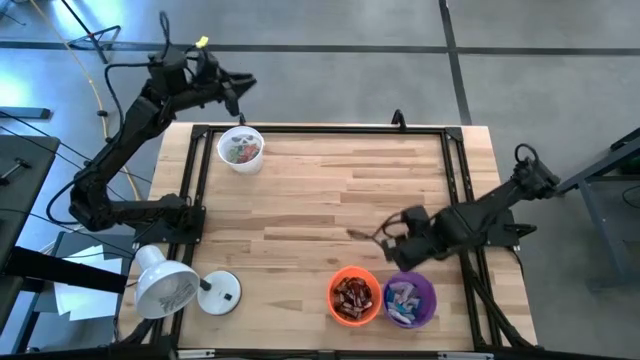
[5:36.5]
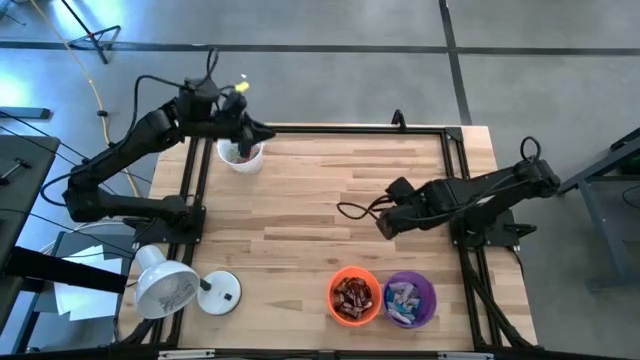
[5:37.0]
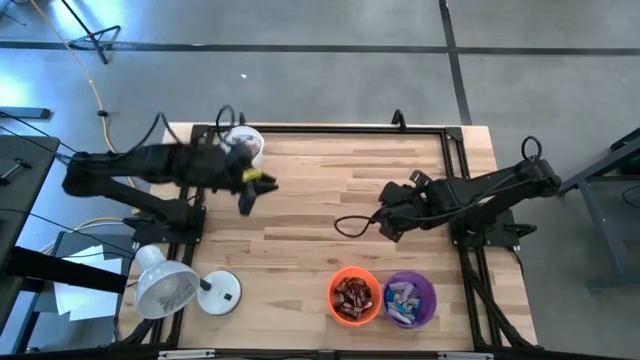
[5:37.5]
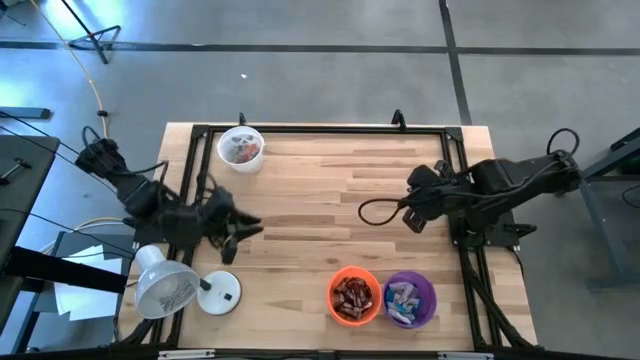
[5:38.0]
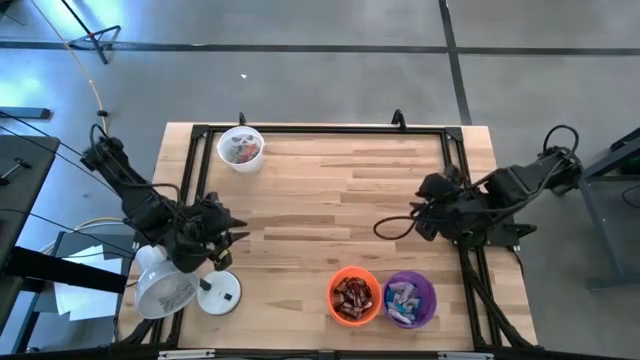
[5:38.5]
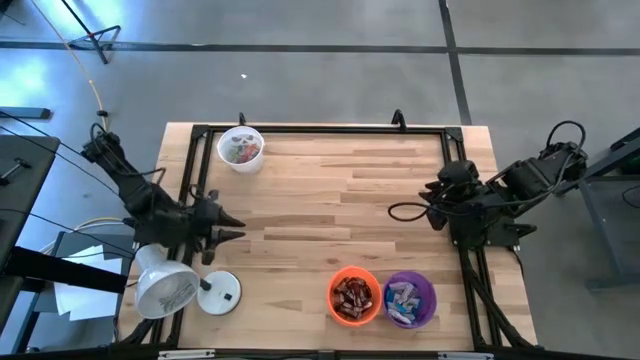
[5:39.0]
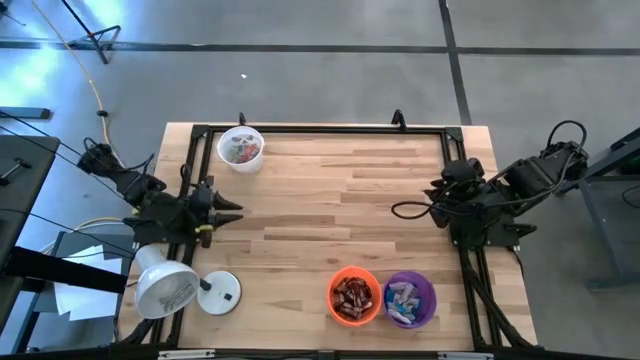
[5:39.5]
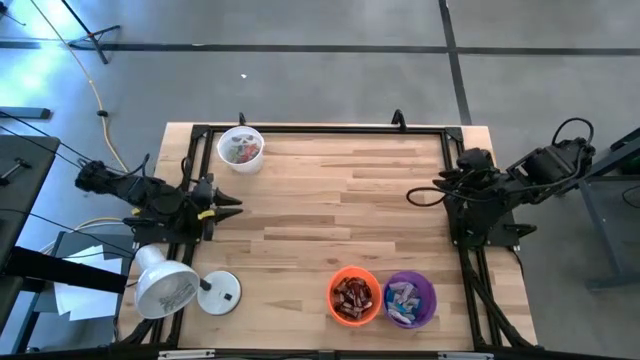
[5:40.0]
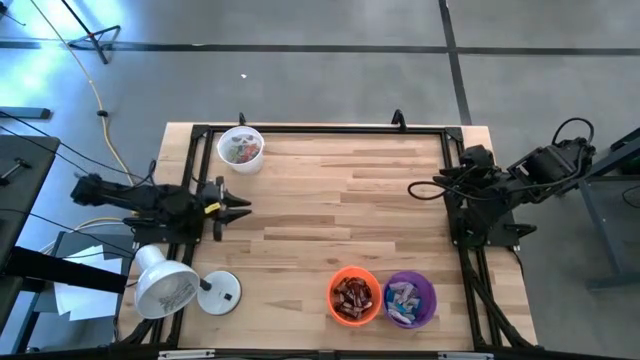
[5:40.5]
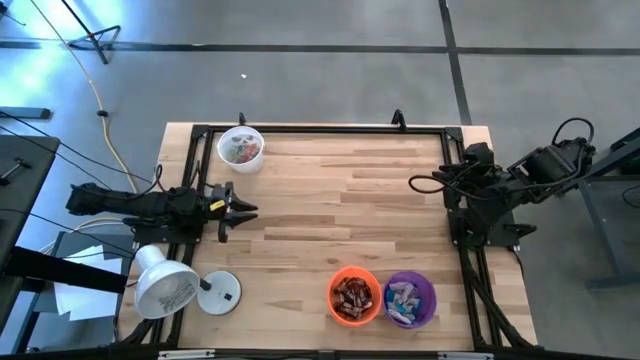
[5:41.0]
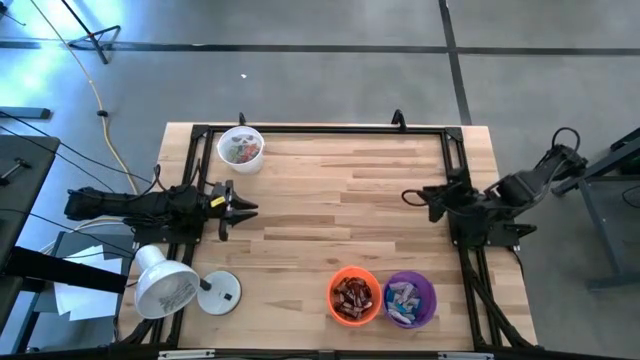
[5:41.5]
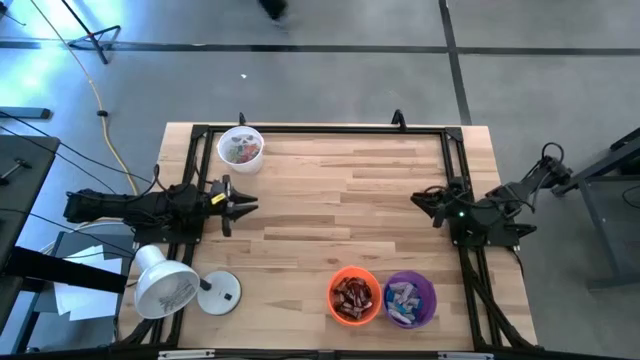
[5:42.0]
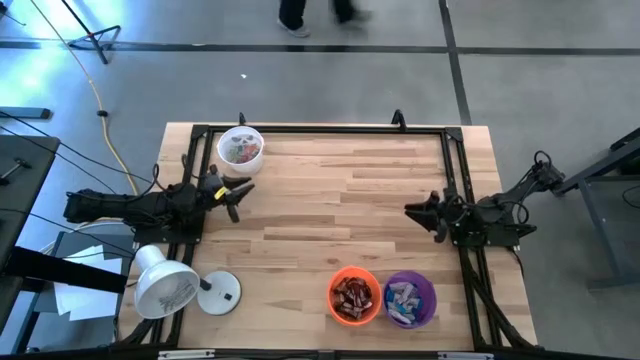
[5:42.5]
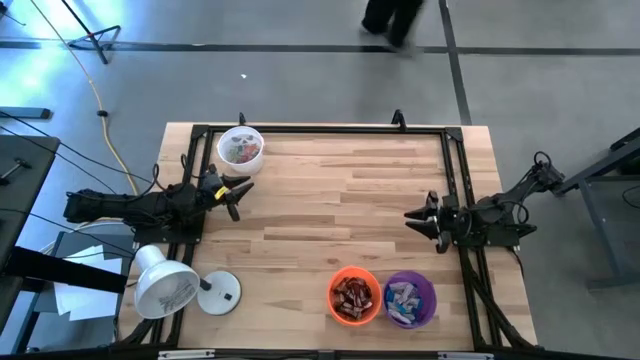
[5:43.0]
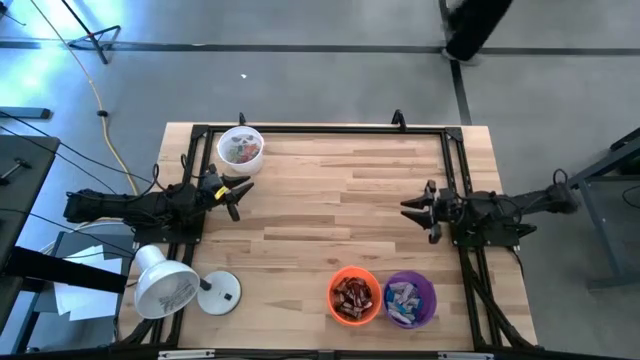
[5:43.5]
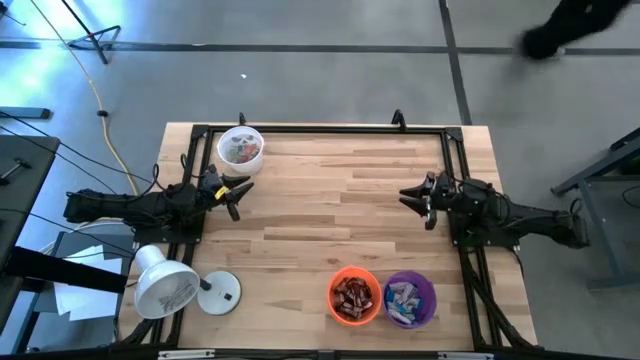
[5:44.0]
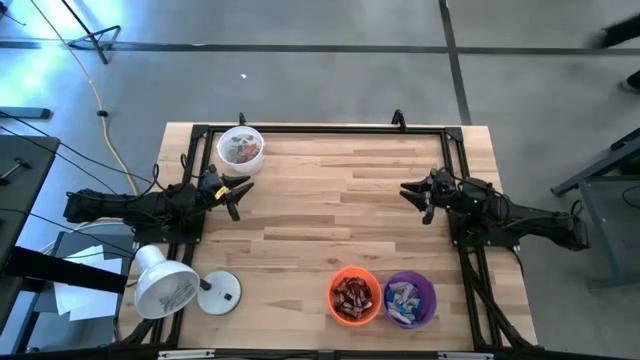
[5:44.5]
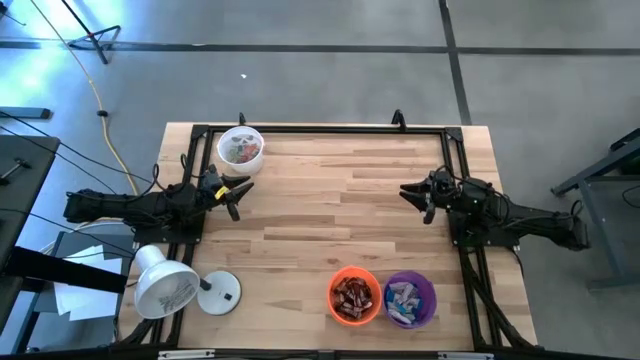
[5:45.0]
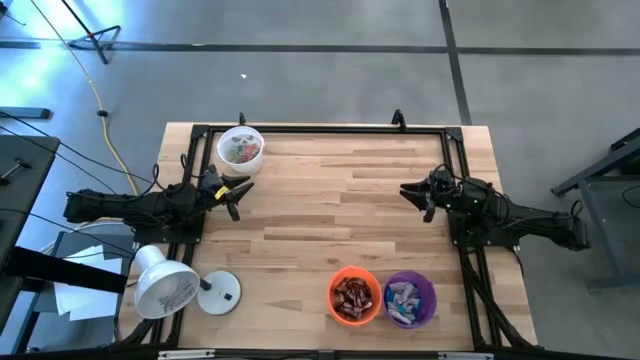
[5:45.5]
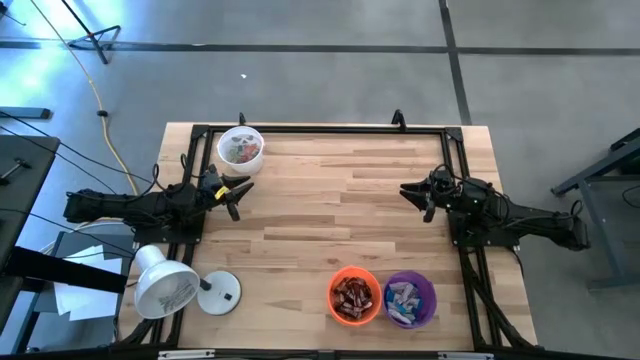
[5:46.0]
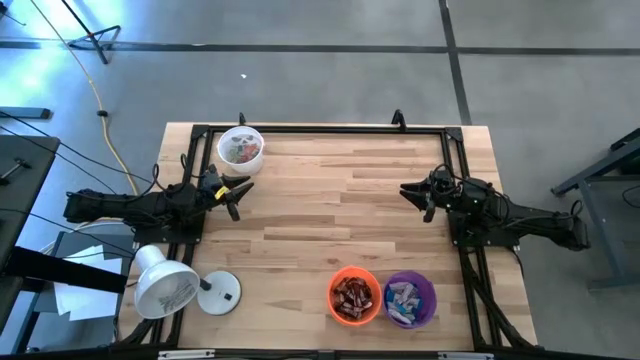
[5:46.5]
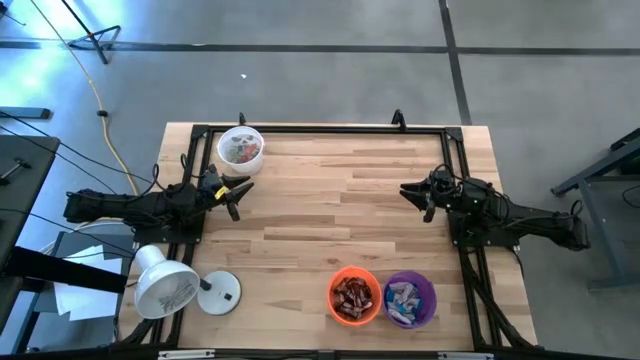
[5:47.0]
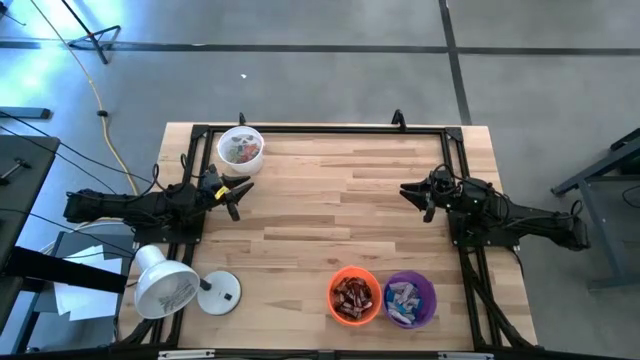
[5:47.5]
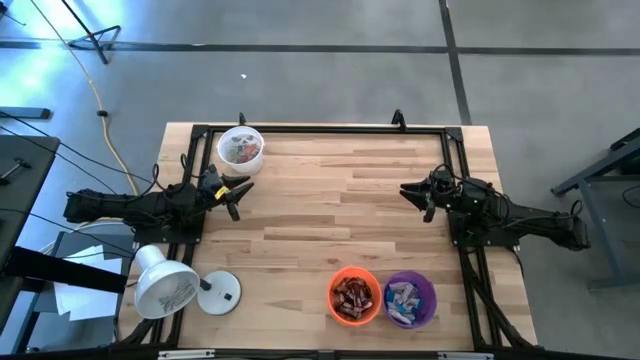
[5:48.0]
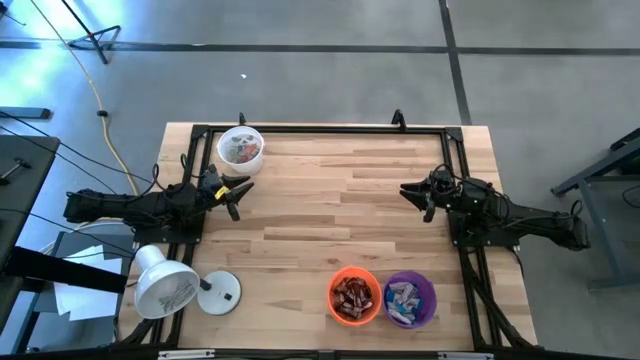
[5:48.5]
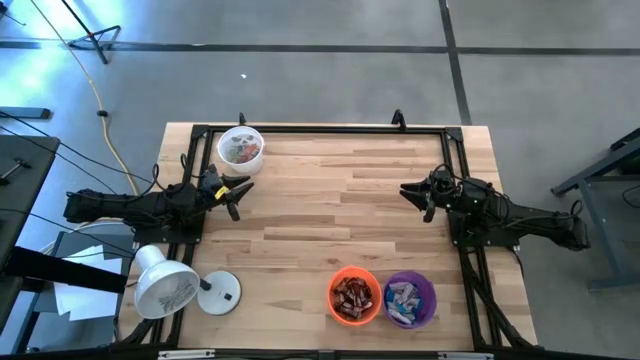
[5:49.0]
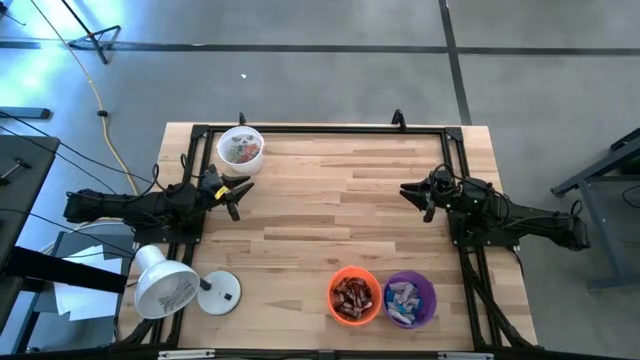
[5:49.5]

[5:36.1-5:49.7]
Task: Organize candy in baskets
Return to Home Position

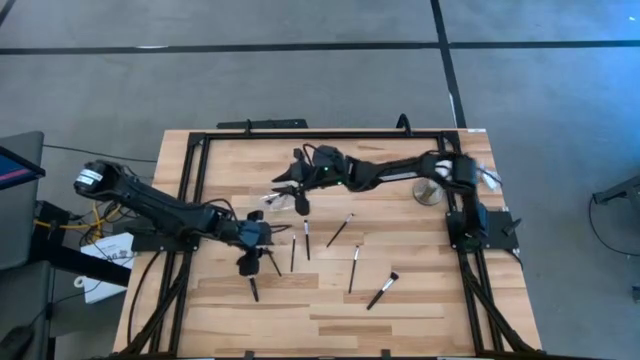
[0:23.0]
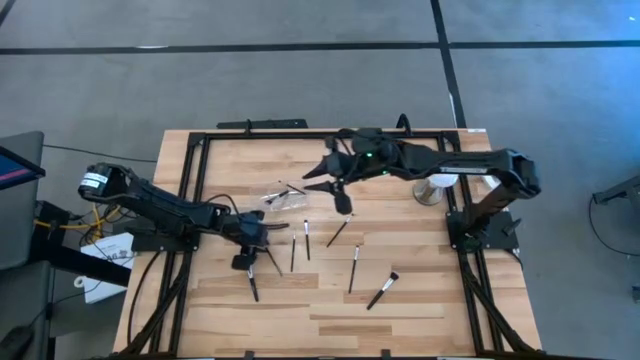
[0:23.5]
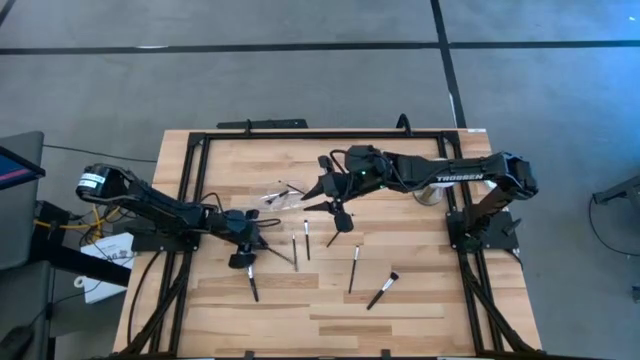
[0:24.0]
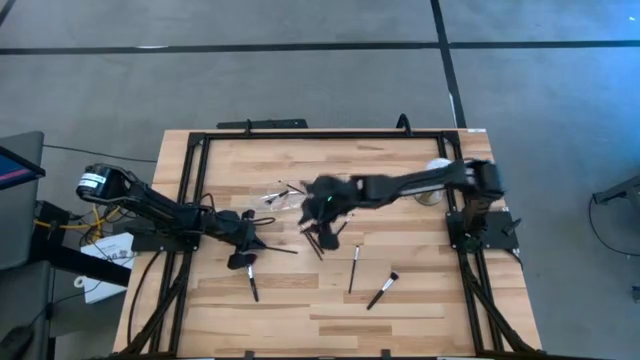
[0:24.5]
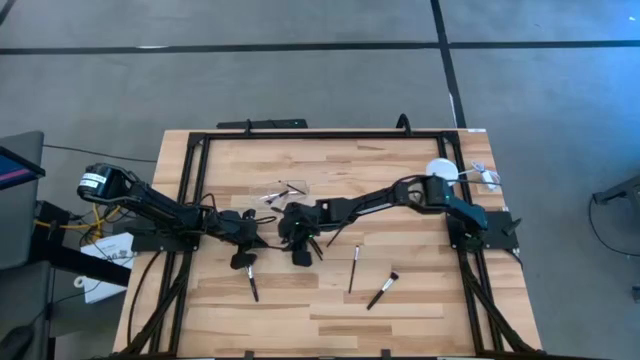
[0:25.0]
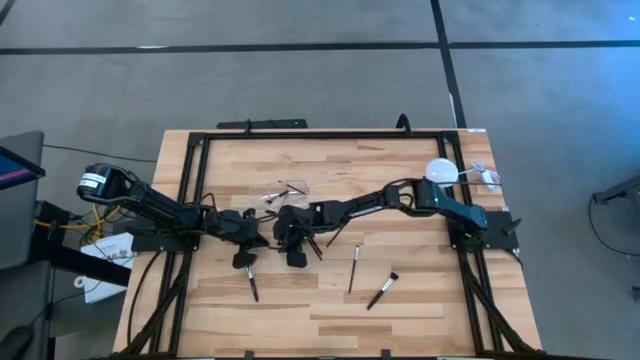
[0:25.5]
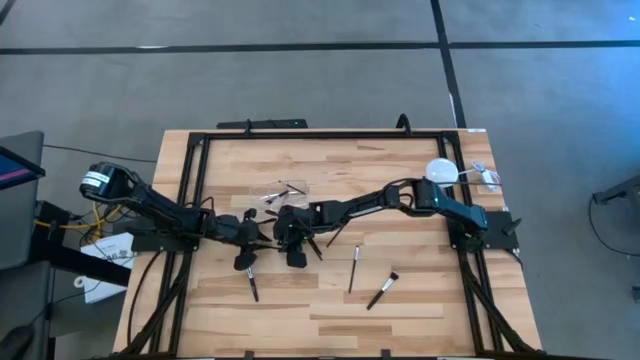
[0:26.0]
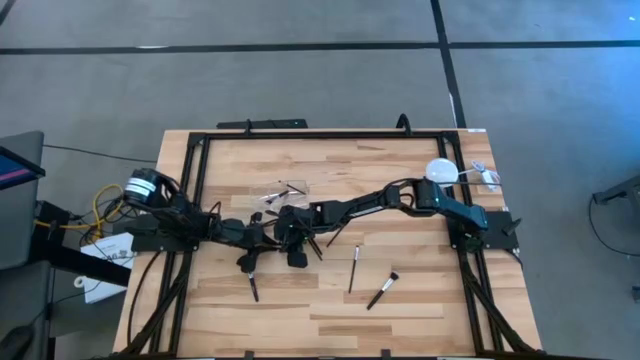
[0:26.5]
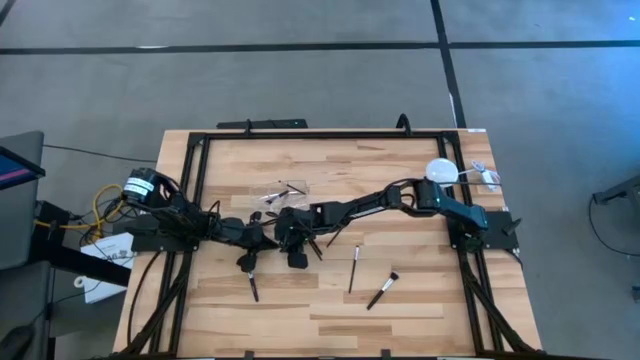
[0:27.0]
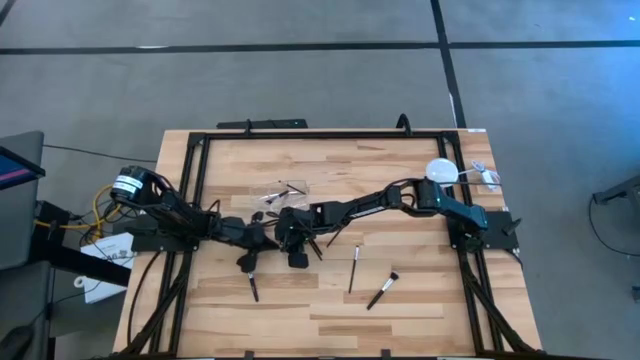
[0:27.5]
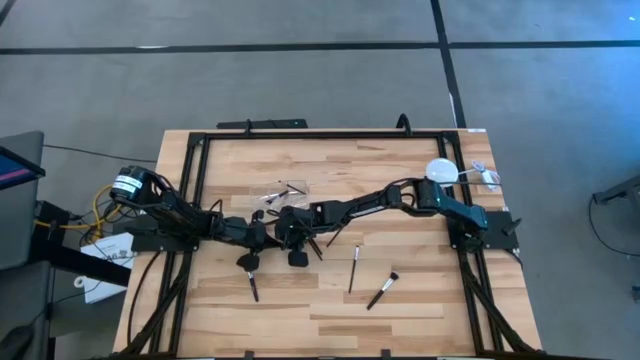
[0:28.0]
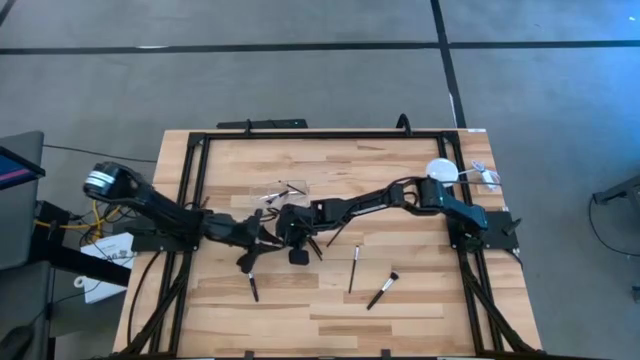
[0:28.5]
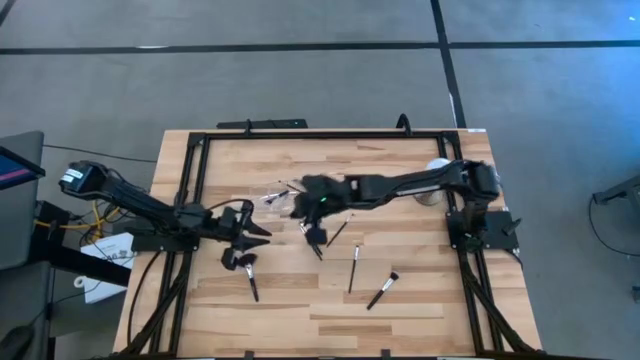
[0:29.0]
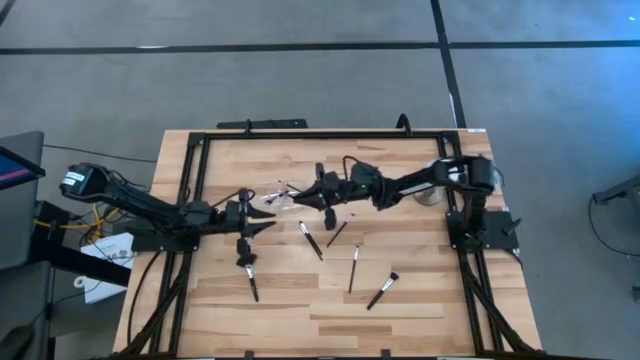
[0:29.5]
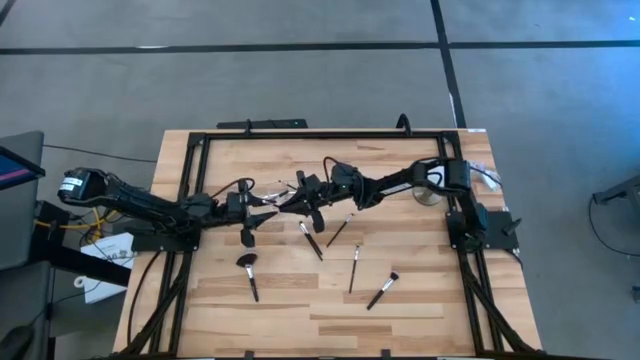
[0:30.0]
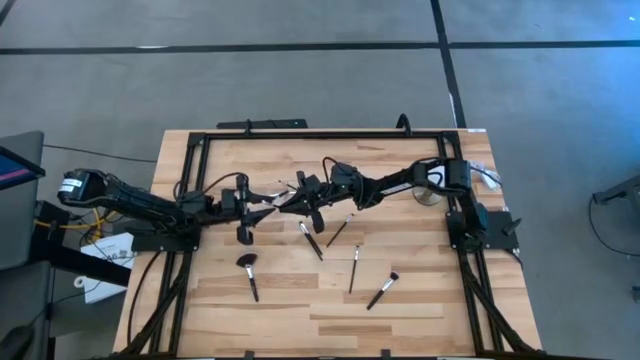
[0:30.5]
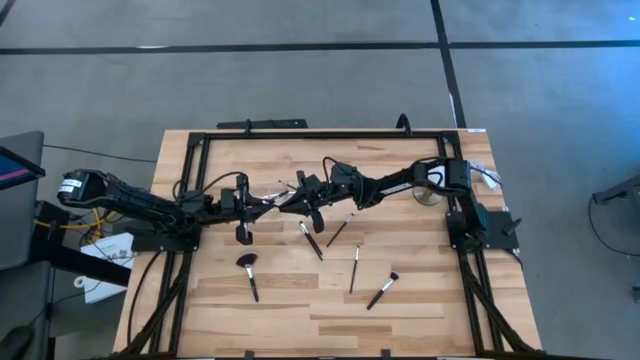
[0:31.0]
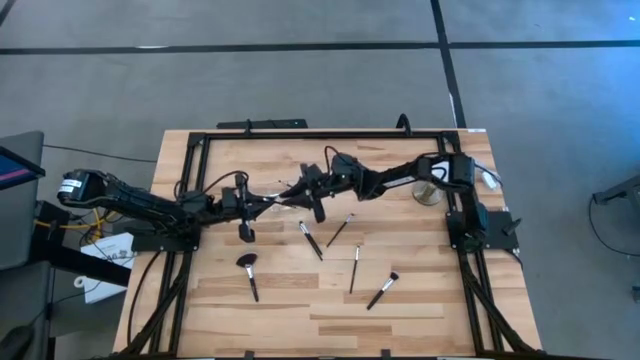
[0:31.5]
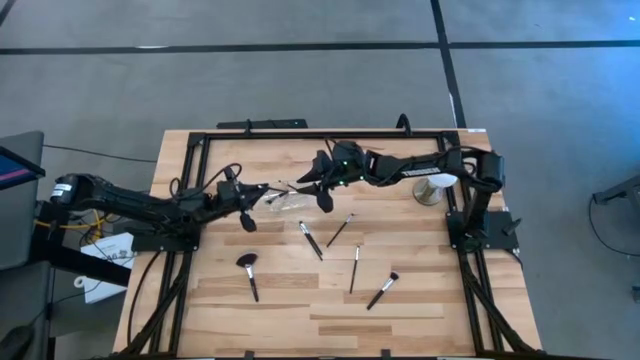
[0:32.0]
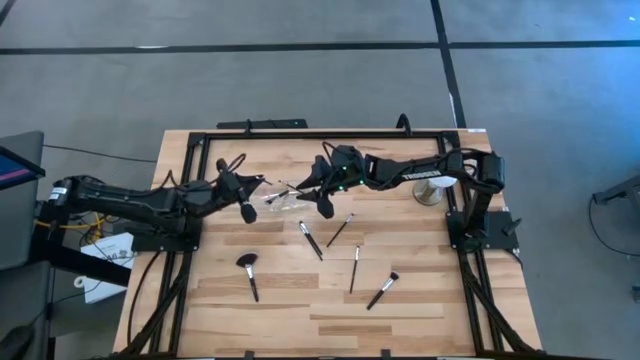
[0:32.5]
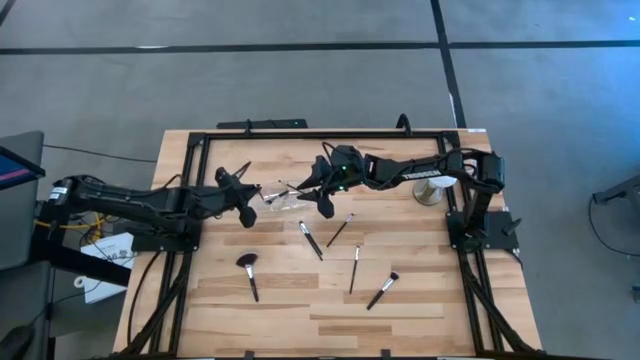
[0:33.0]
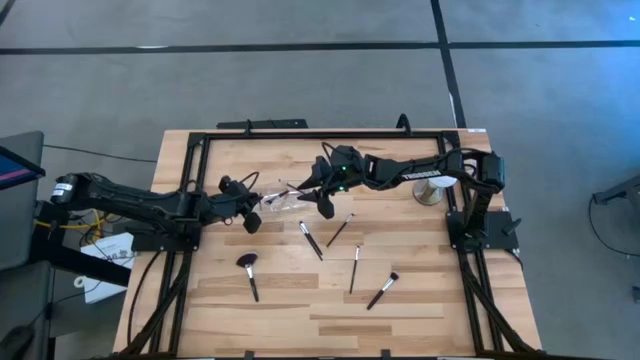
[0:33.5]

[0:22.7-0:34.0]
Task: Put items in baskets/containers
Put the eyeshadow brush into the transparent organizer
